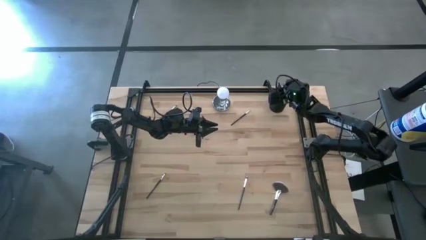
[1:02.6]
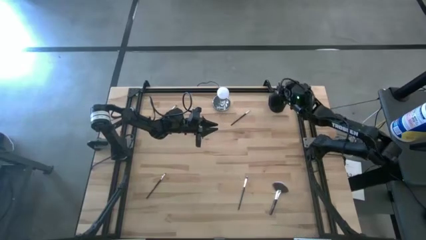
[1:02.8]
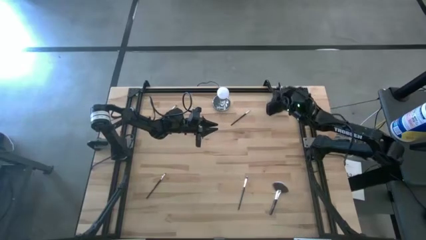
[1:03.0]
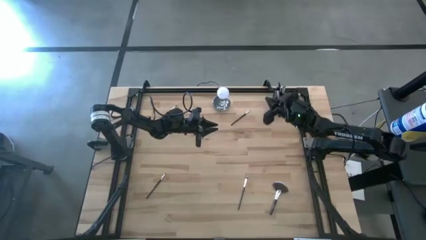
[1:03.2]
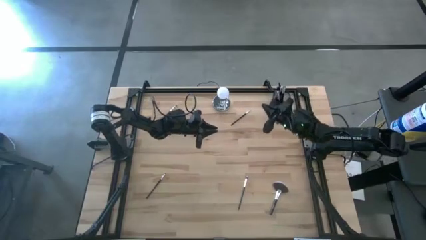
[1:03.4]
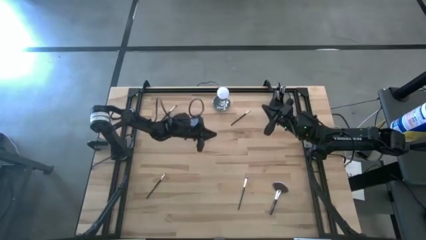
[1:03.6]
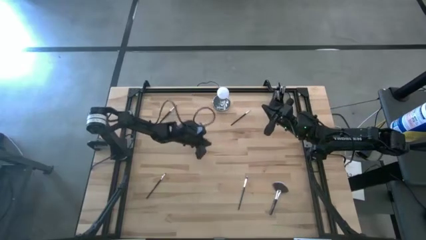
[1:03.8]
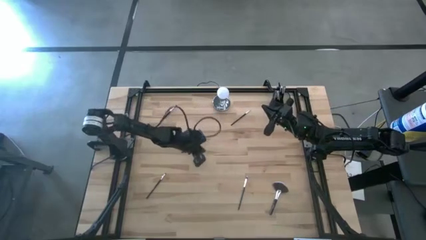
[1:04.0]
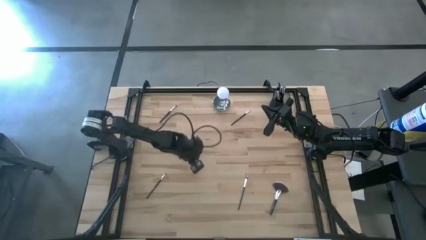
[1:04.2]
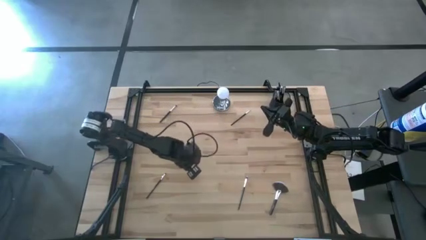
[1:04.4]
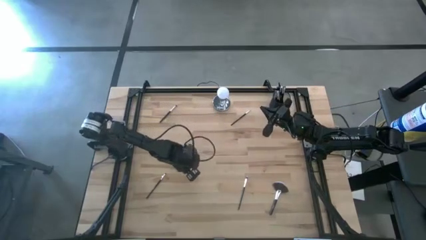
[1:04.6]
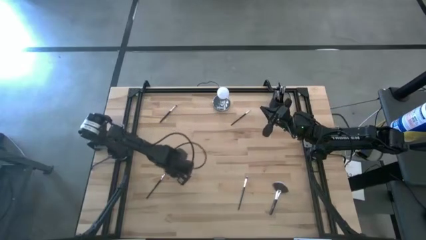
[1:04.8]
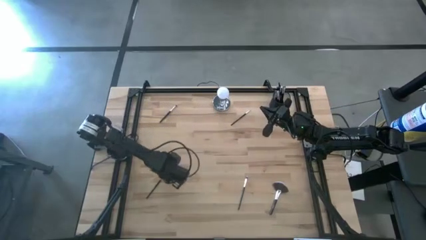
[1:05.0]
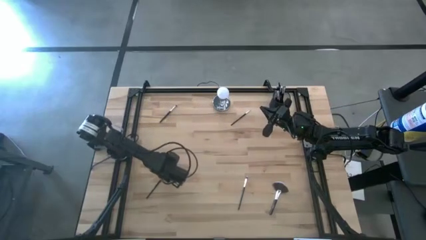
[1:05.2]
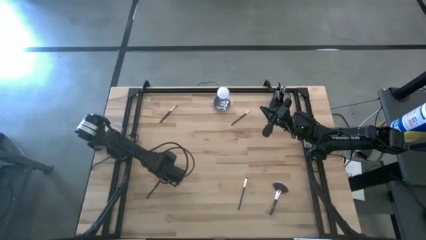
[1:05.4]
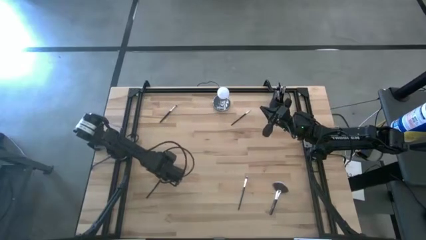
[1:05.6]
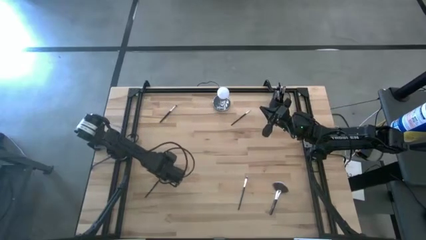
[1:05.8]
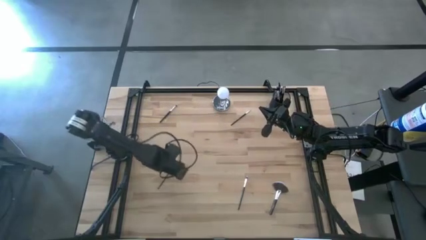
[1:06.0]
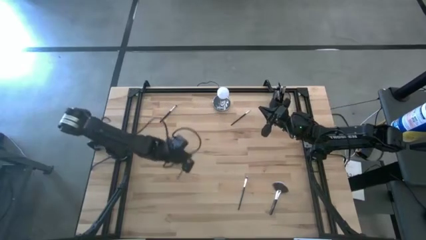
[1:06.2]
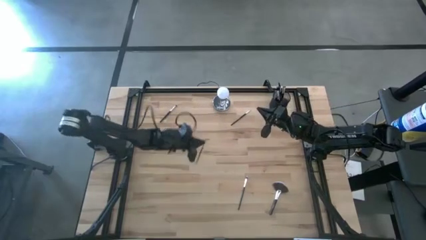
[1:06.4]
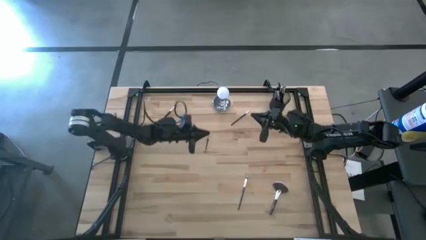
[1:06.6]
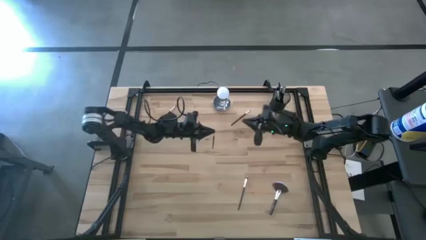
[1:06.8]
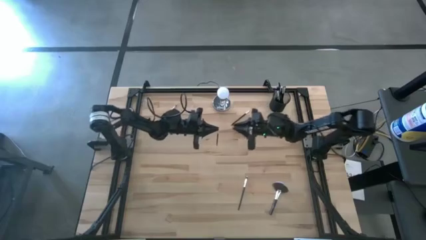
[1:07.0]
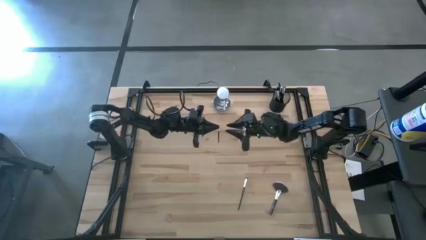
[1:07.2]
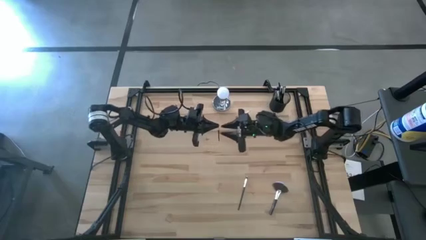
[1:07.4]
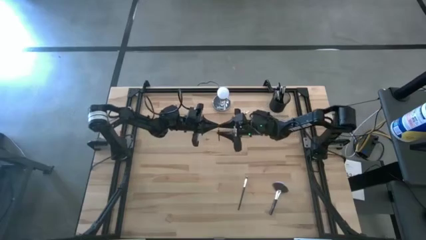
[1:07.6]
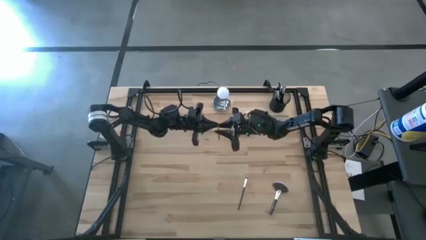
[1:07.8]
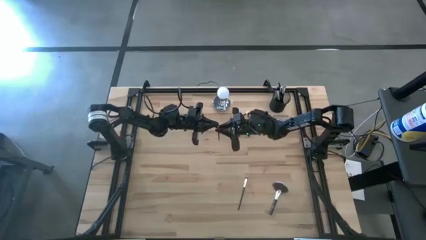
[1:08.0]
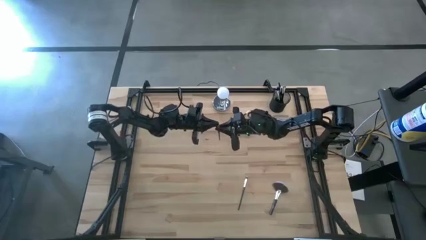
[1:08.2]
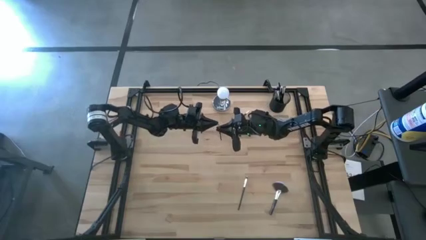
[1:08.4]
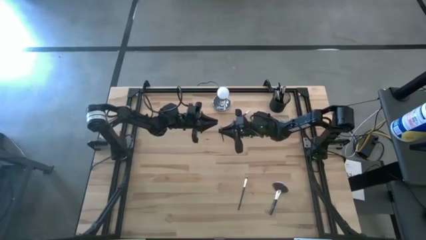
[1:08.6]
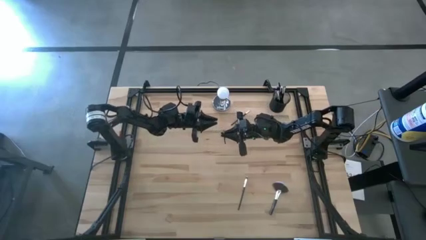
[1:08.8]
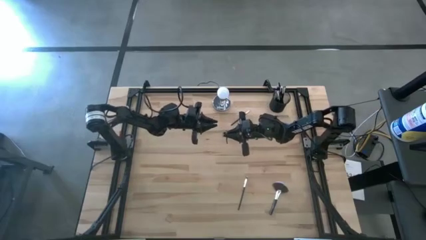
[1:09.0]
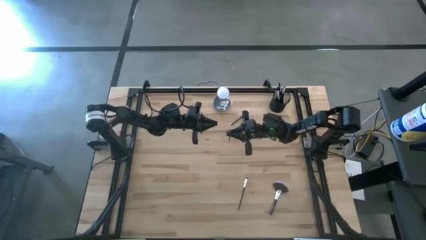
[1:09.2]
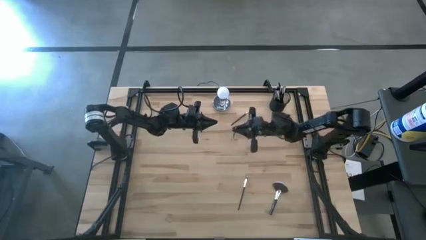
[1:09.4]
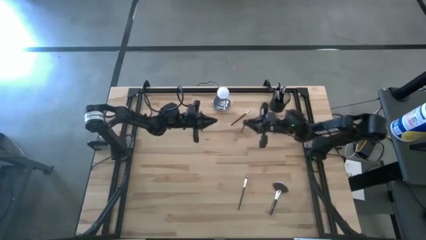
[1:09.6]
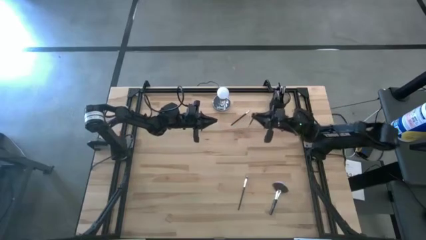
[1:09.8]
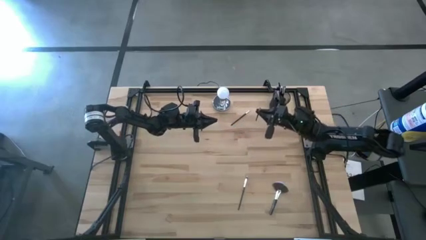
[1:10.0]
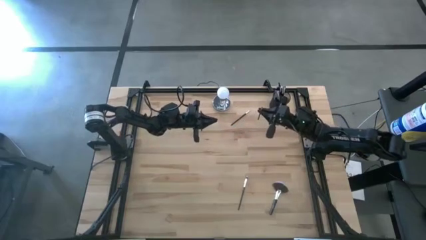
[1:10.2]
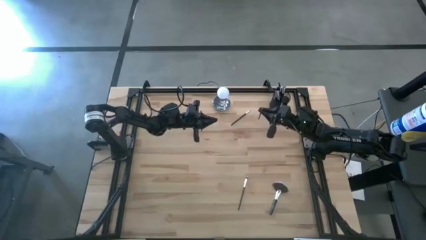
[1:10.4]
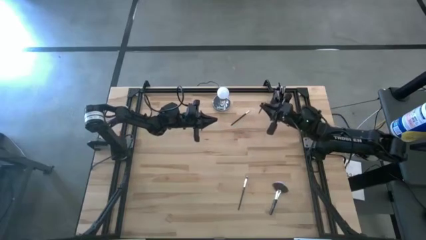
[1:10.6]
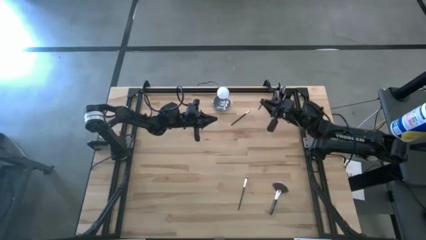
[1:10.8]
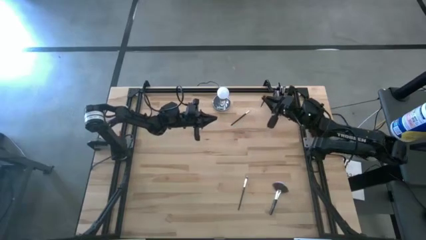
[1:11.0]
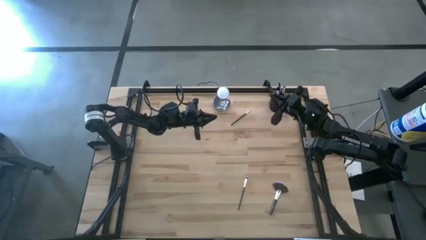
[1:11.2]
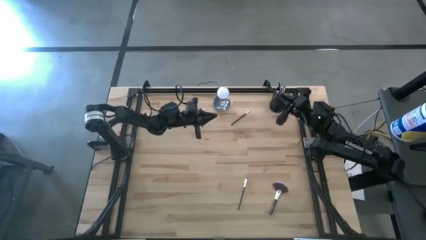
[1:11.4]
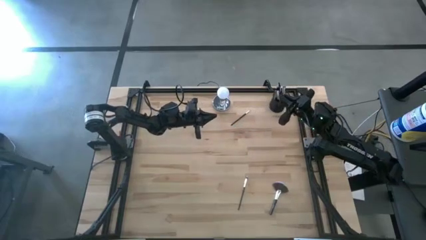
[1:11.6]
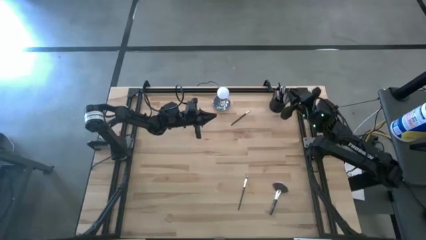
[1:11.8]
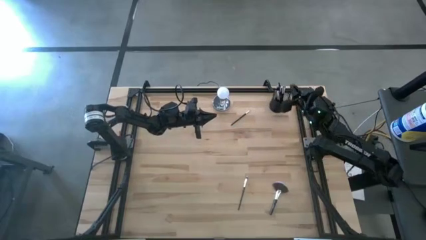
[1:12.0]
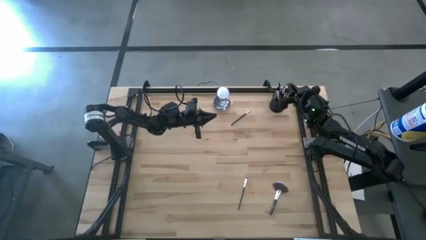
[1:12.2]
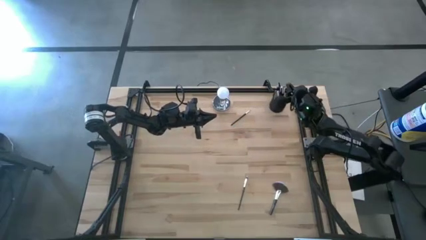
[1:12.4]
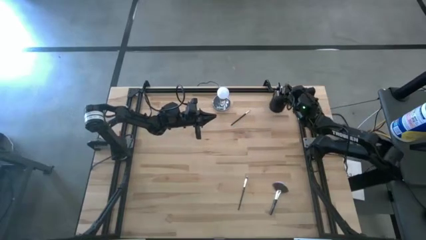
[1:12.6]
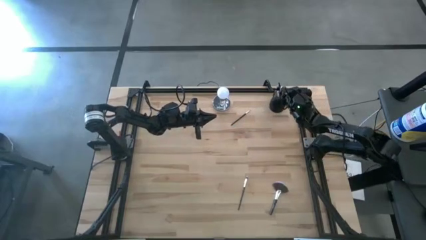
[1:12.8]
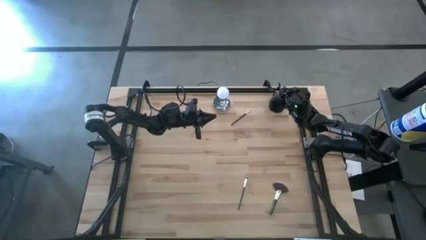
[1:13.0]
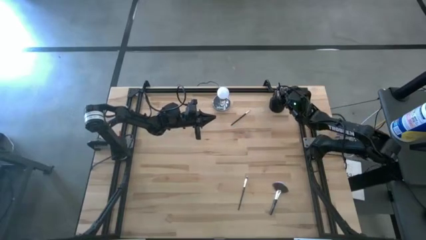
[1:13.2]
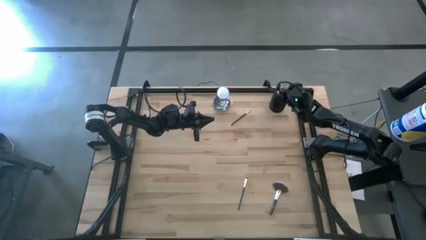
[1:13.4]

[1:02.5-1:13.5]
Task: Put items in baskets/containers
Put the black eyeshadow brush into the black pen holder

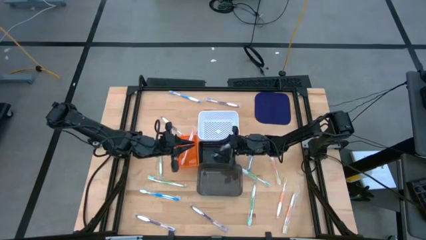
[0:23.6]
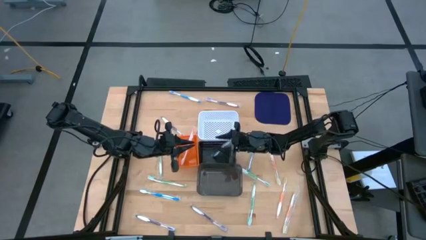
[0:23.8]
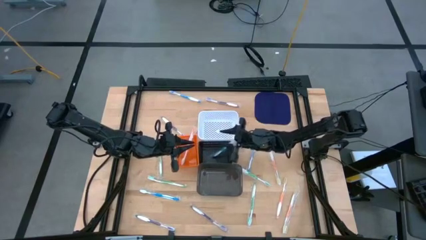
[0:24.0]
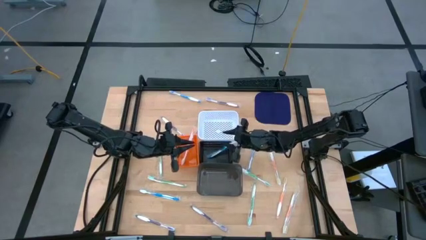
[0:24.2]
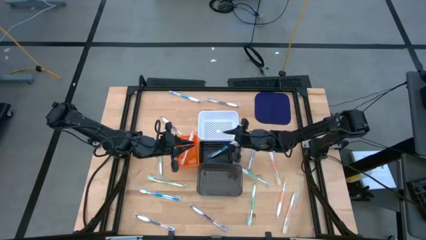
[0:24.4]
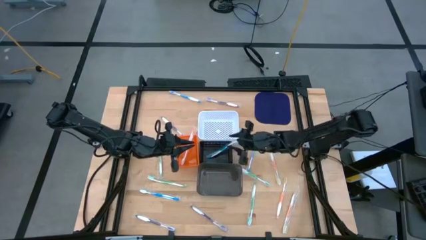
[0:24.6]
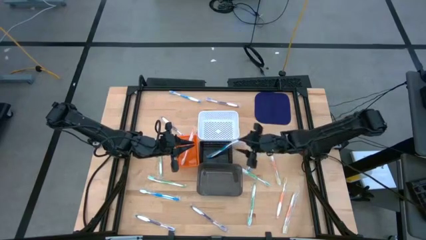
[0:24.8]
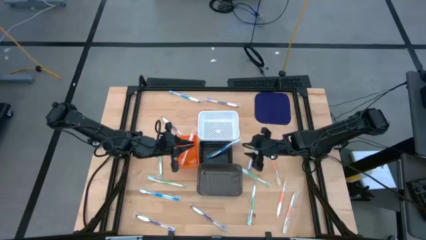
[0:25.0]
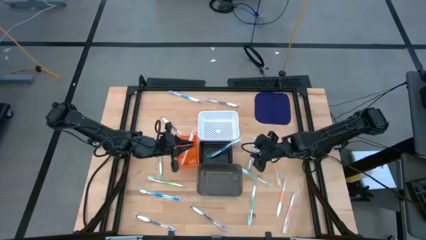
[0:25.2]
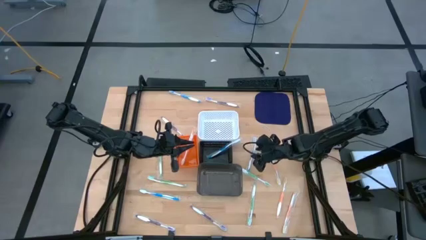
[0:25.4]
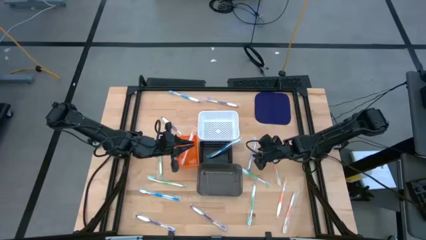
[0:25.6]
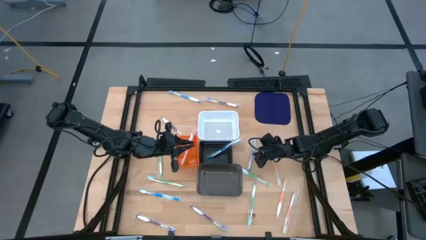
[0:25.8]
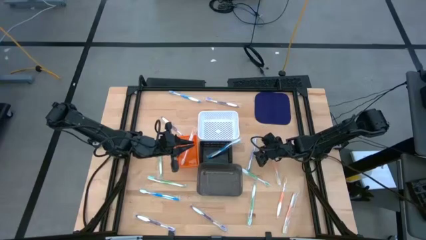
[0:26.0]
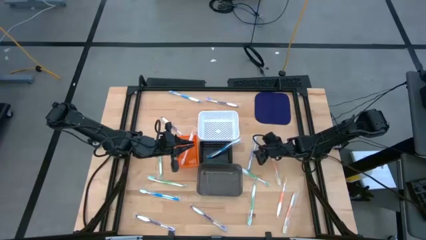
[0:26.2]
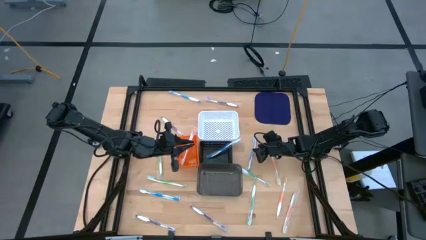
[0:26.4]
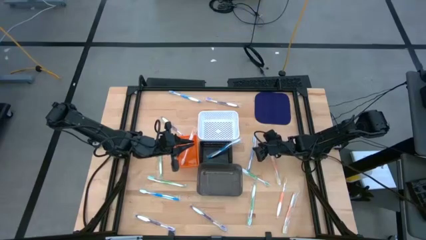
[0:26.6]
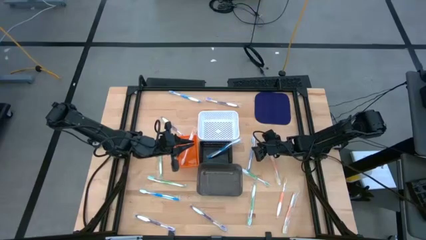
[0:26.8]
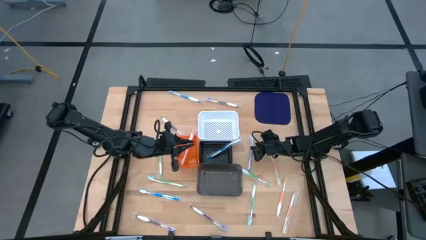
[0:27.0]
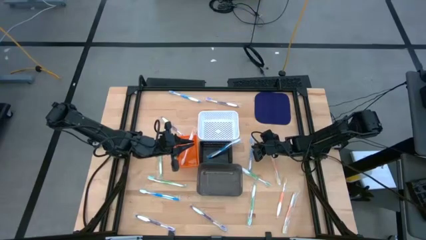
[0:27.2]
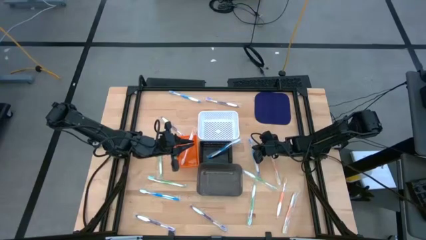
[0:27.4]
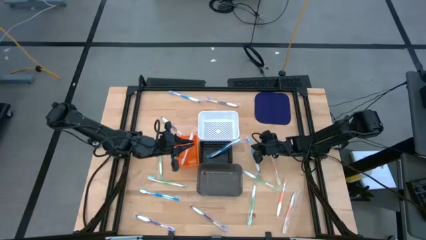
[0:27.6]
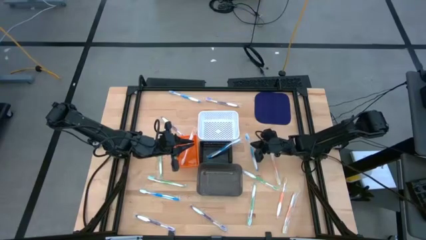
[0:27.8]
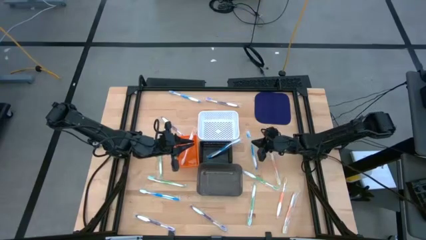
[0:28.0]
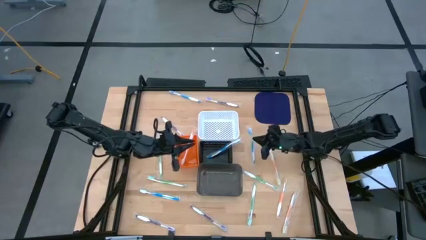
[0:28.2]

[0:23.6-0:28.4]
Task: Pick & Place Toothbrushes
Put the middle right blue toothbrush into the black basket
